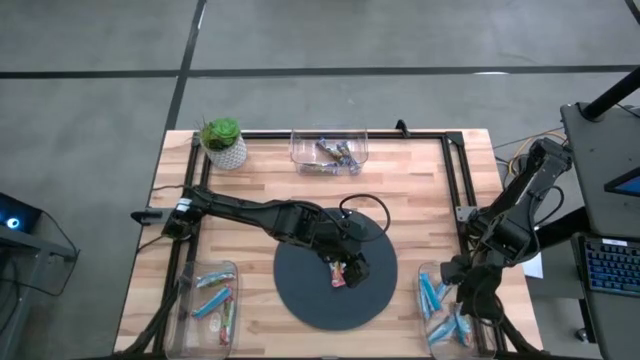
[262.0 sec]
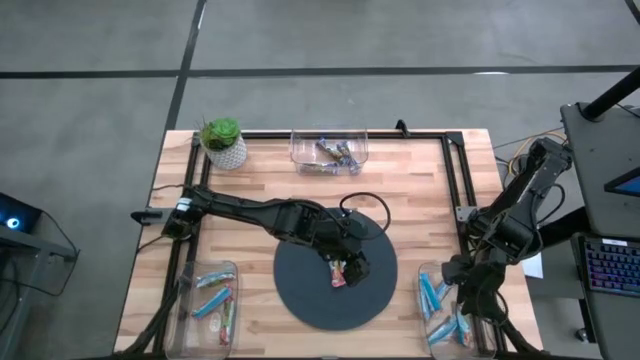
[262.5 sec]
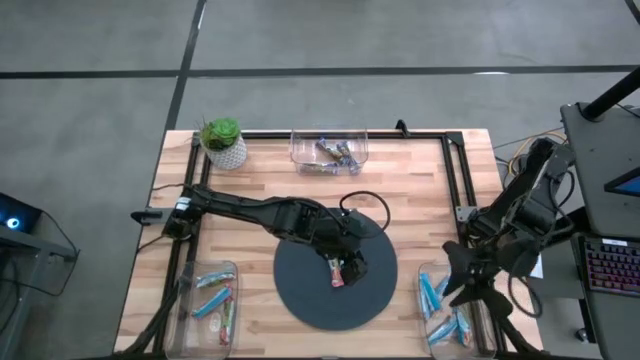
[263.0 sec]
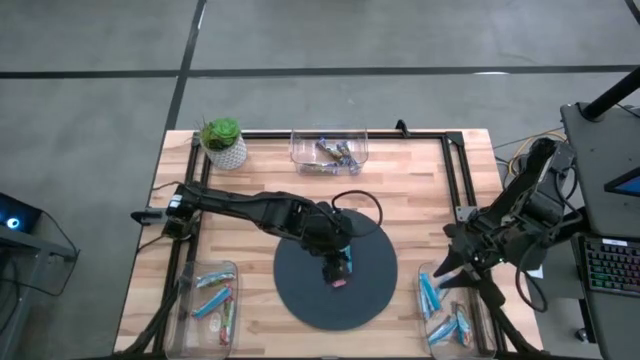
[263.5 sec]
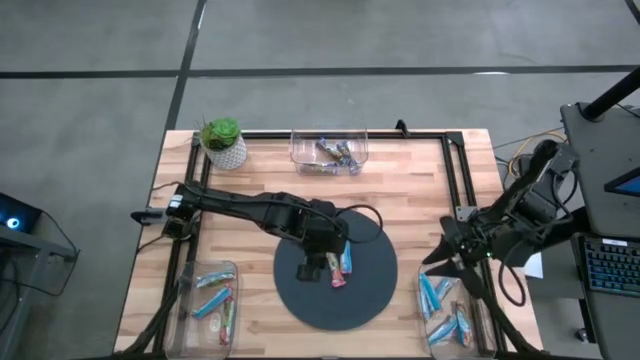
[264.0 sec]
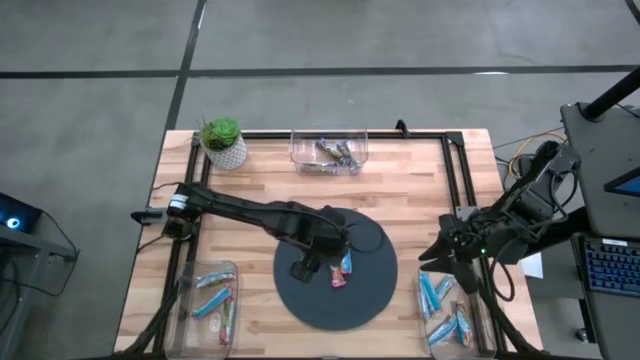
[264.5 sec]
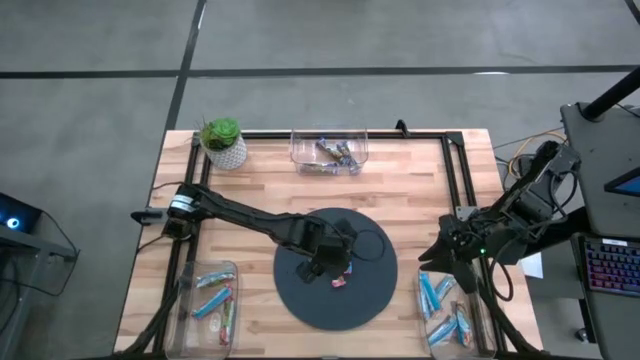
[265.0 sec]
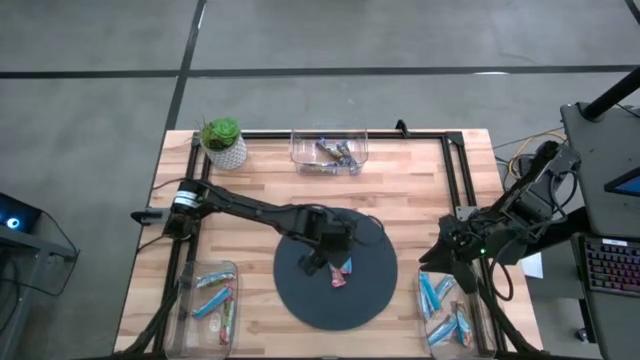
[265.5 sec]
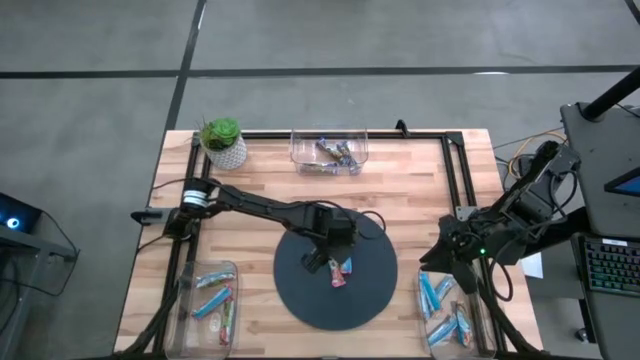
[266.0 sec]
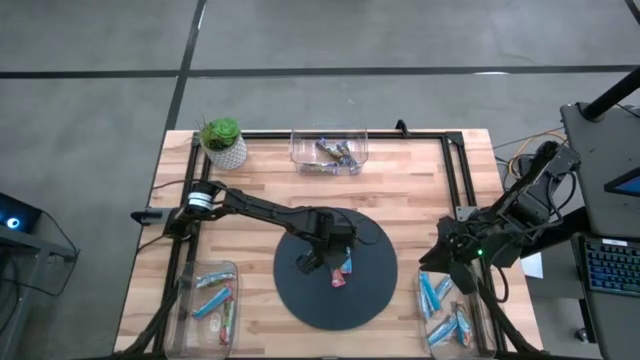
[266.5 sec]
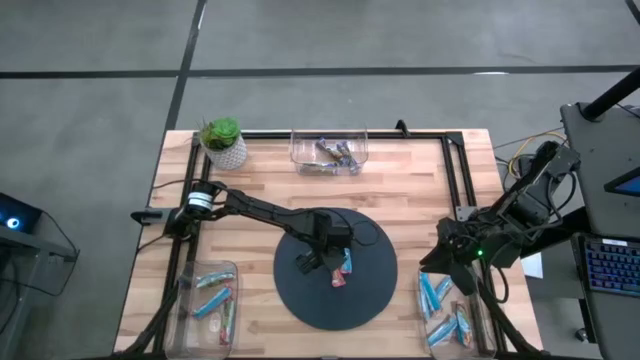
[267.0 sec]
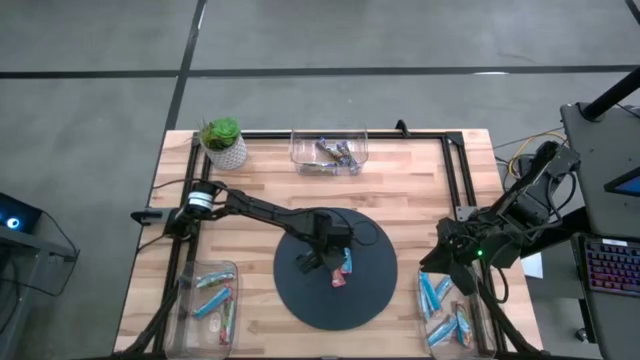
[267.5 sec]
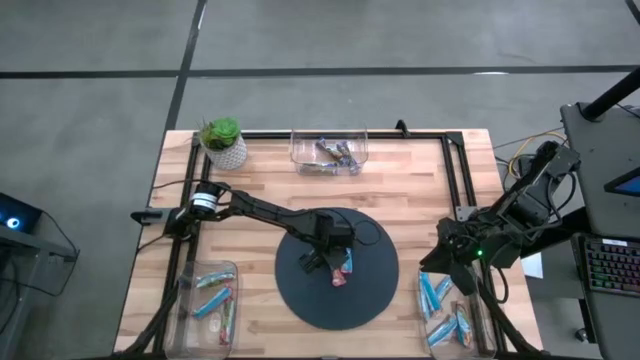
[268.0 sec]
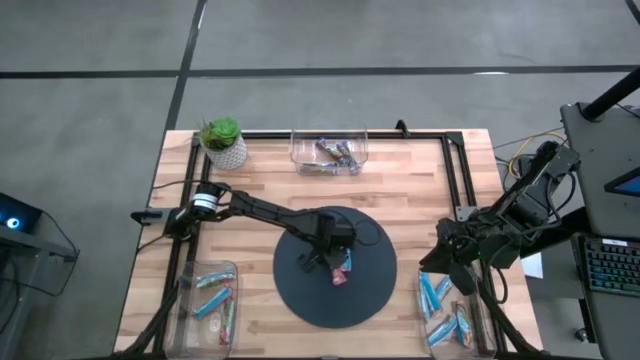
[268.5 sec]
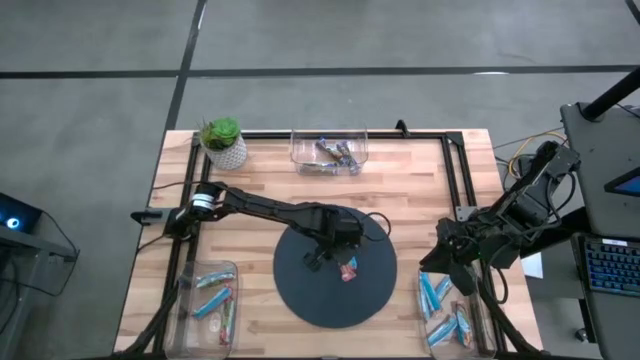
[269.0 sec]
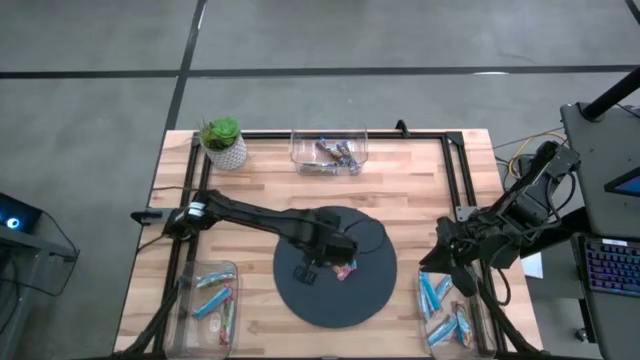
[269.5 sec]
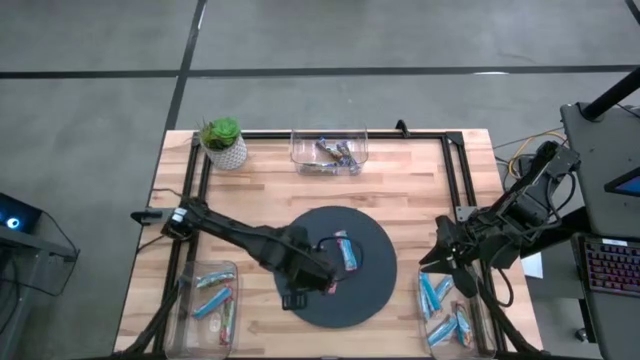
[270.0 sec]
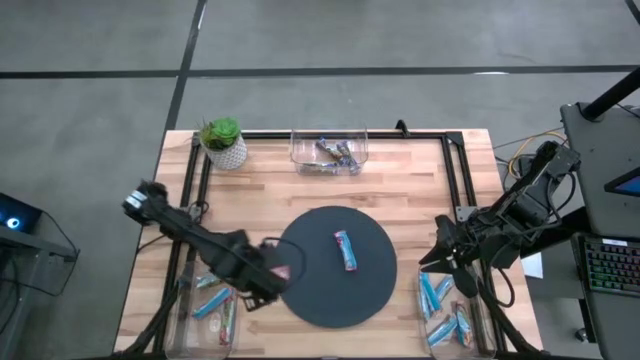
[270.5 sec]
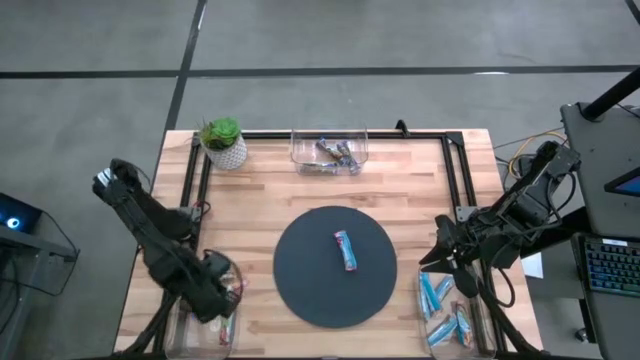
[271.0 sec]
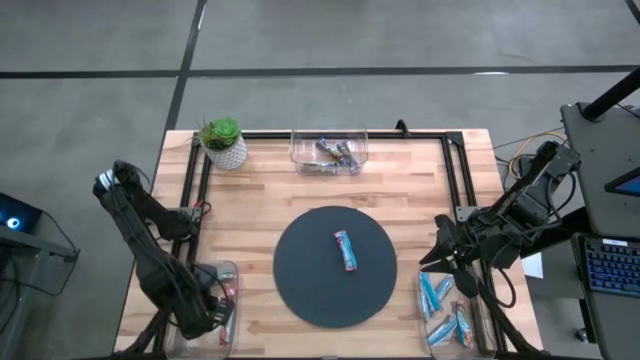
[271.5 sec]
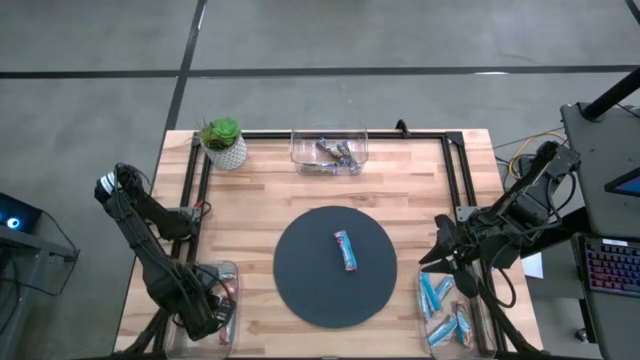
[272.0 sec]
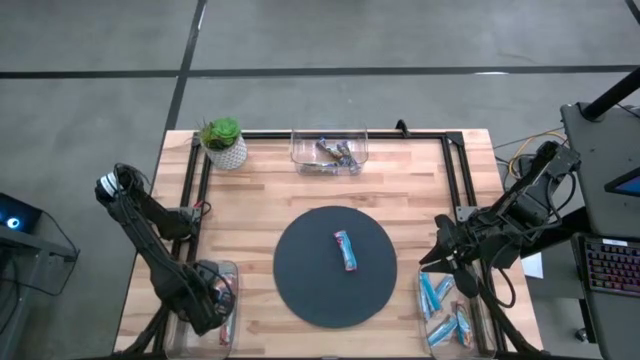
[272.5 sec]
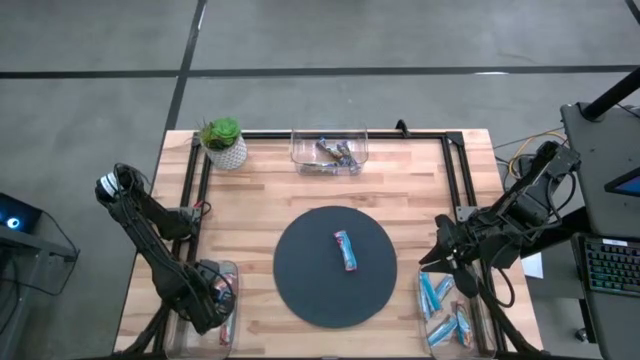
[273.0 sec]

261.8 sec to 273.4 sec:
Task: Pick and place Granola Bars by type
Put the red granola bar into the bottom left transparent bin

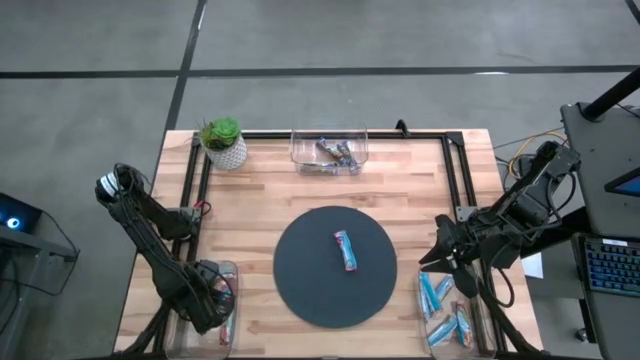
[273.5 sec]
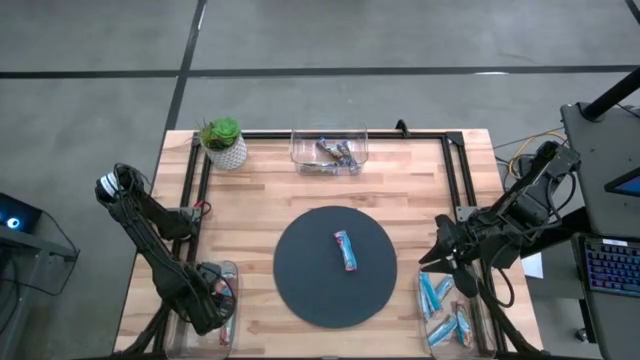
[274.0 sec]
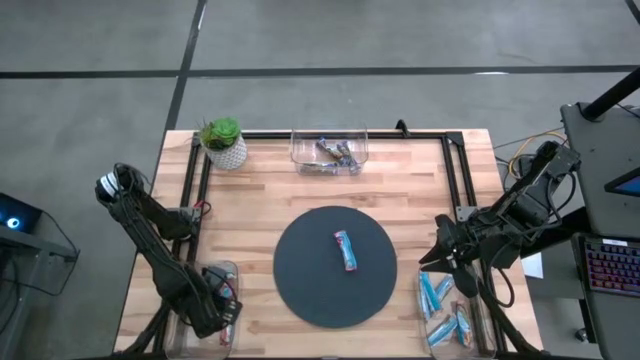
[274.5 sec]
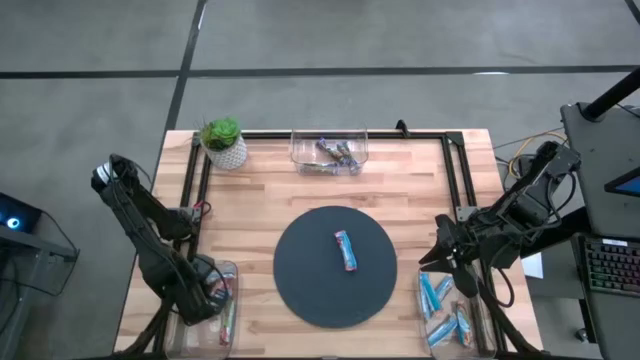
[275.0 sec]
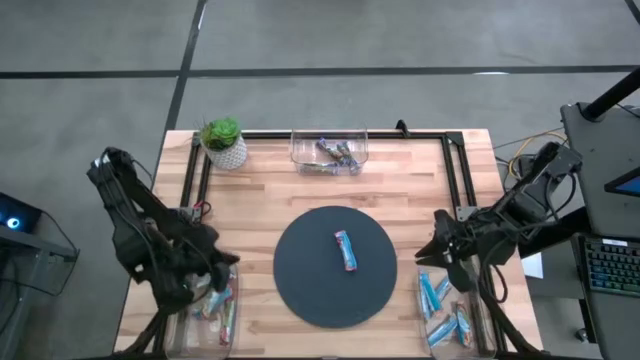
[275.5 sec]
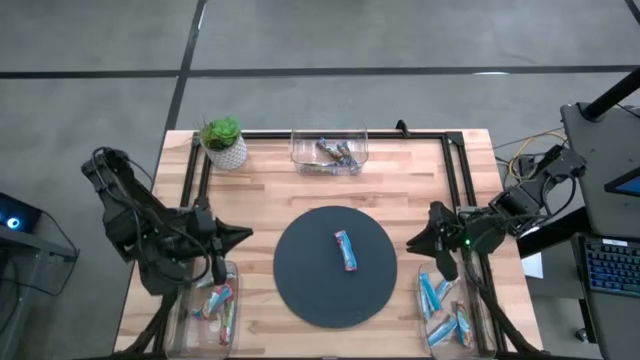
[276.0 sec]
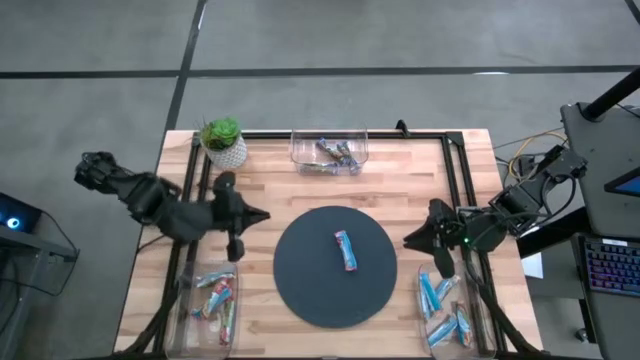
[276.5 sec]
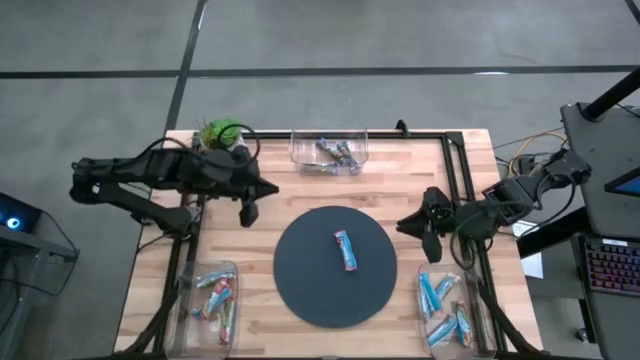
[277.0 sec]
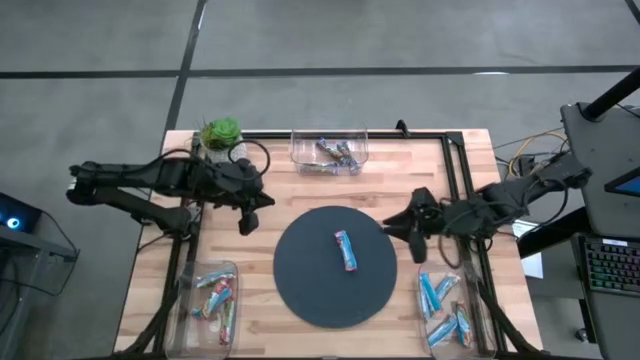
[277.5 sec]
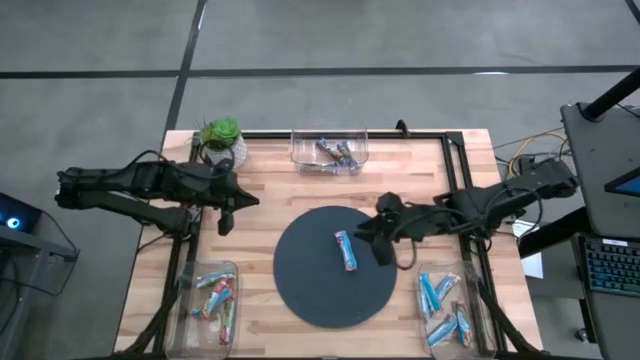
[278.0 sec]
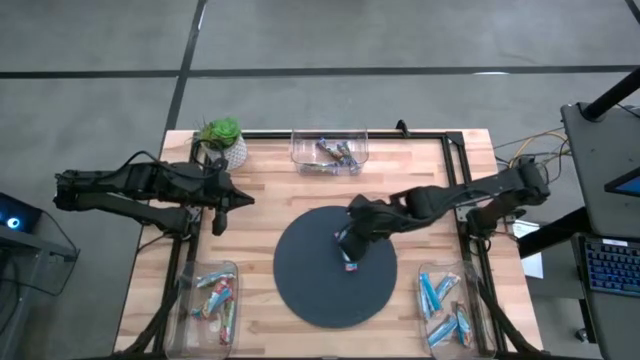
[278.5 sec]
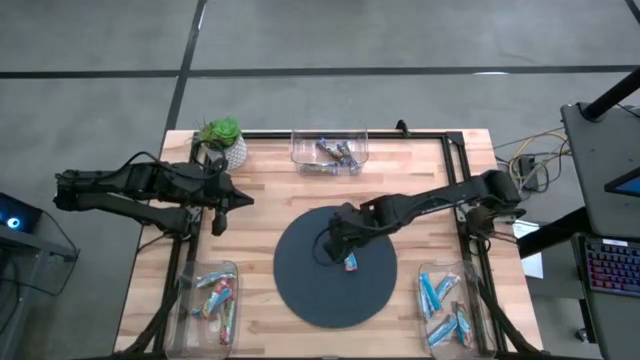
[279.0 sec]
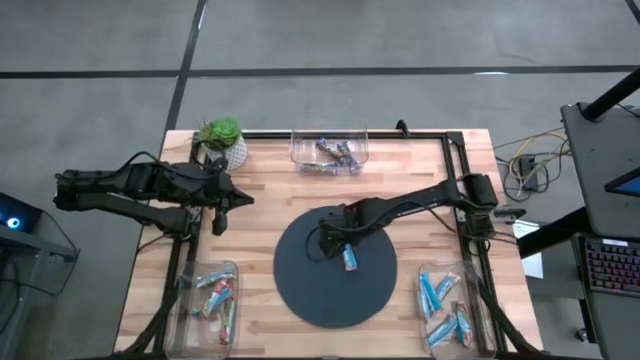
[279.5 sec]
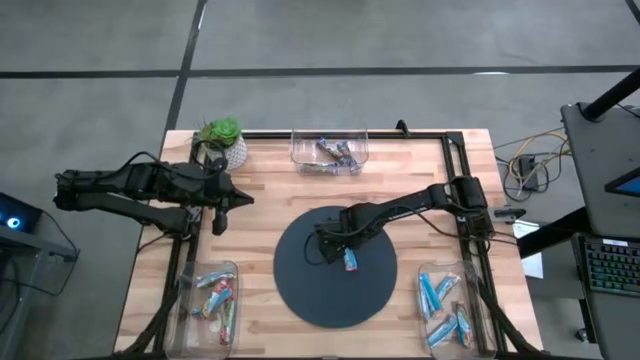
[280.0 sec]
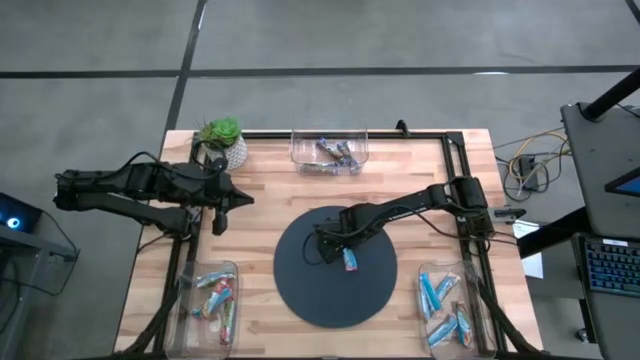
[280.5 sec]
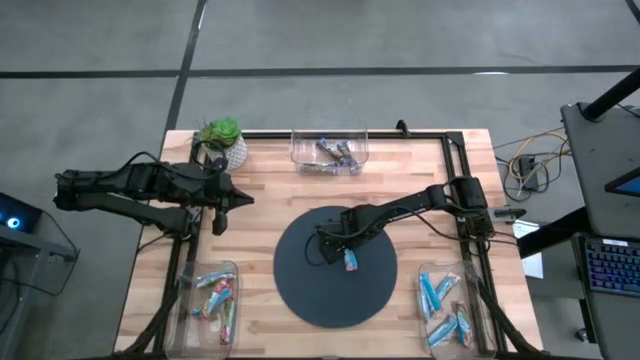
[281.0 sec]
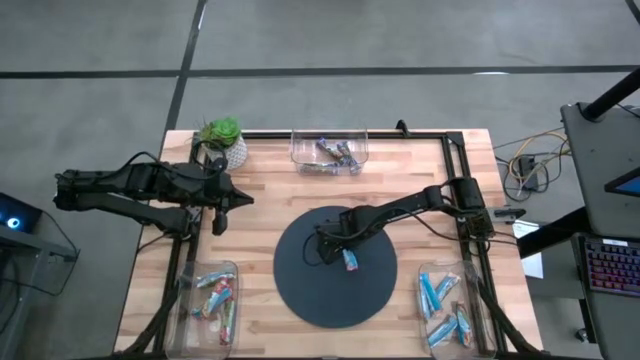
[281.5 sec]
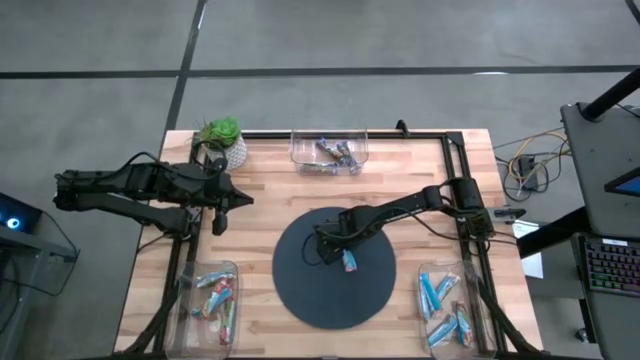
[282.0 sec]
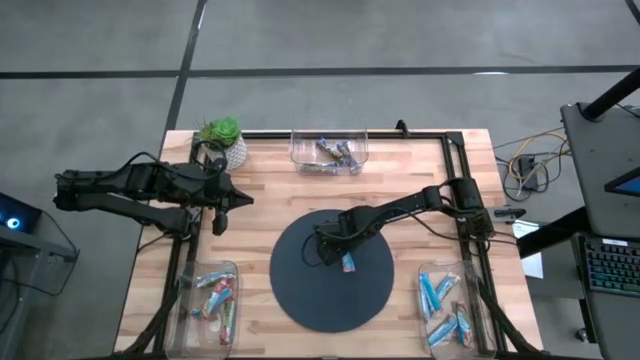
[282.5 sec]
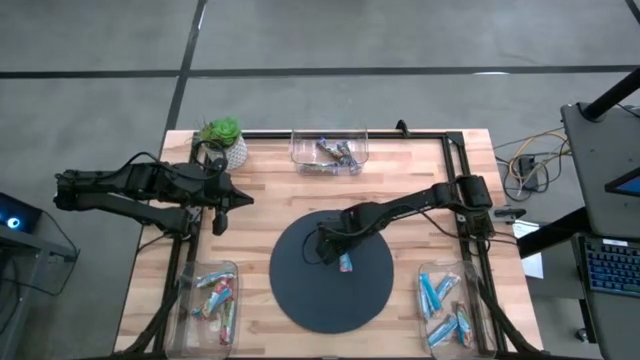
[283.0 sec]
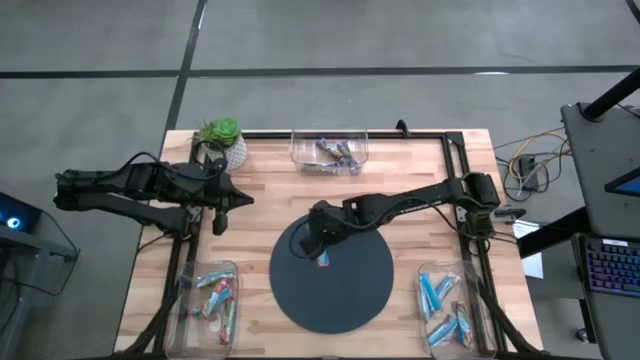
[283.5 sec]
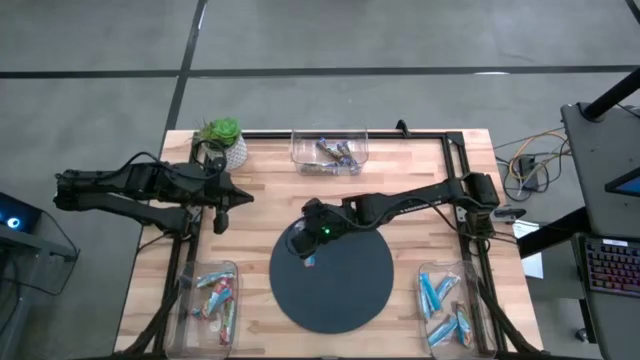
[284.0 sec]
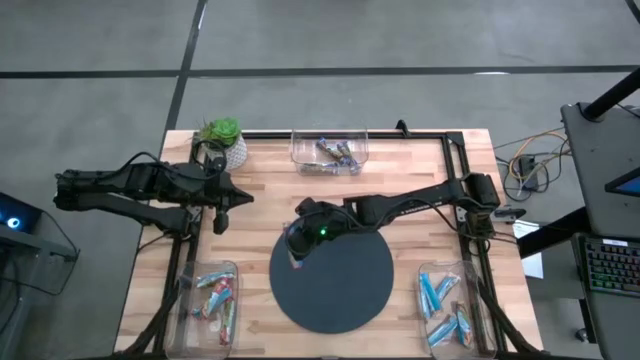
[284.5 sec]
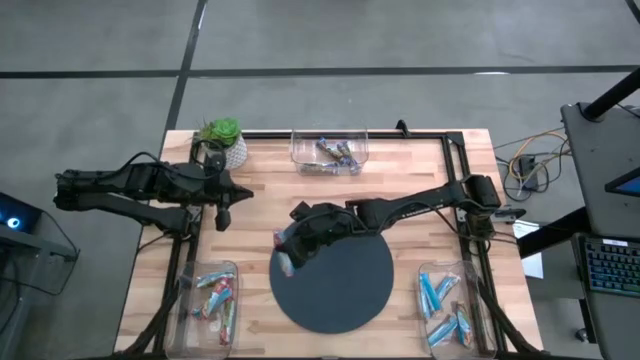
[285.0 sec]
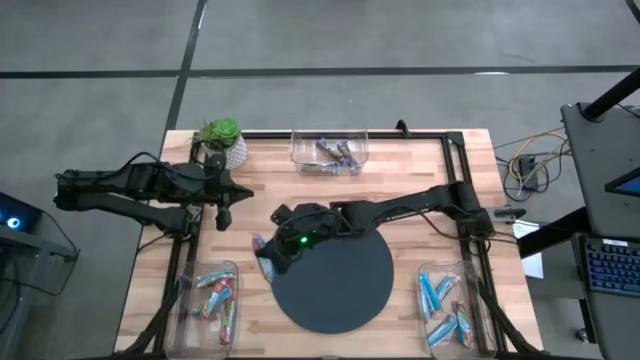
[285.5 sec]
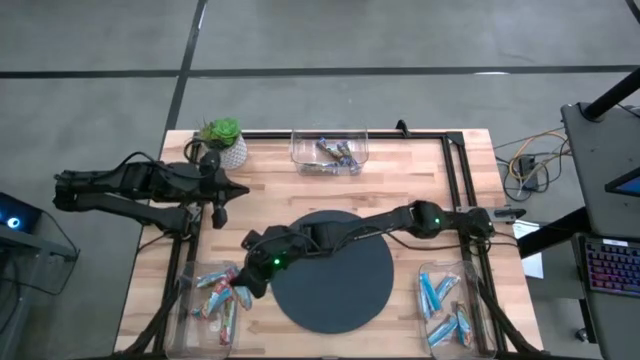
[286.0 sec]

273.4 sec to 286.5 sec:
Put the red granola bar into the bottom left transparent bin
